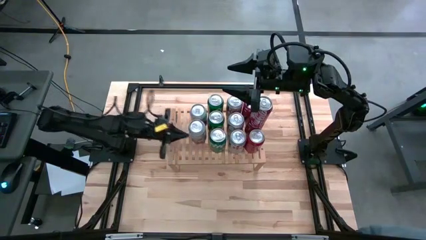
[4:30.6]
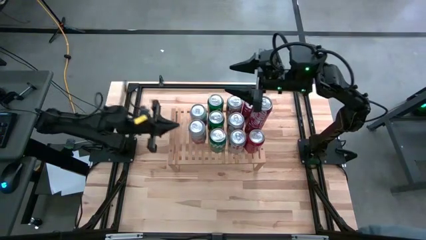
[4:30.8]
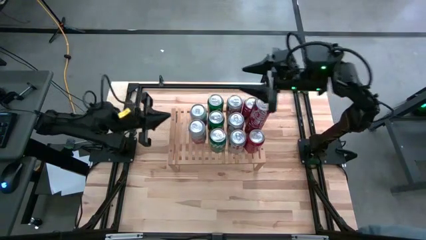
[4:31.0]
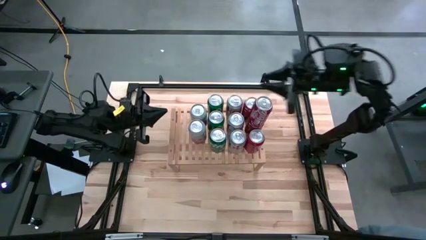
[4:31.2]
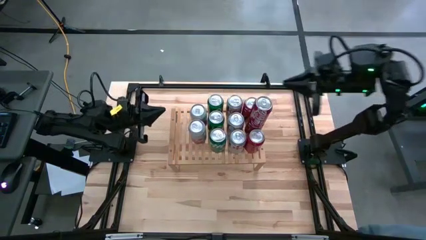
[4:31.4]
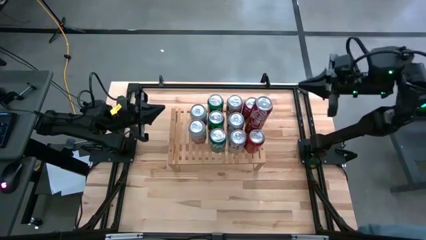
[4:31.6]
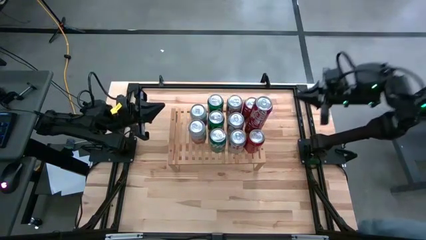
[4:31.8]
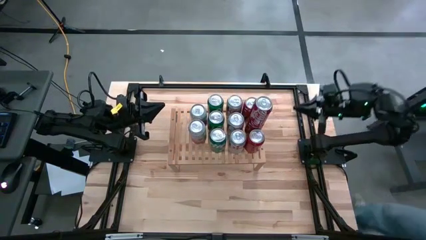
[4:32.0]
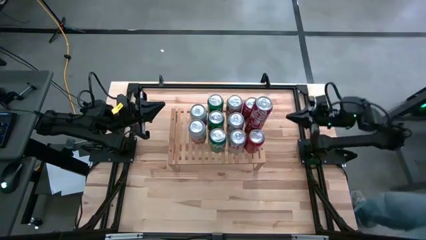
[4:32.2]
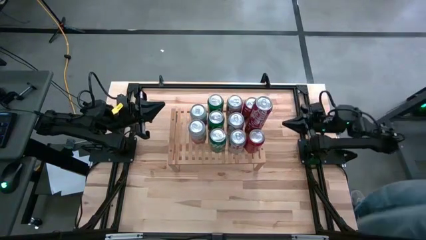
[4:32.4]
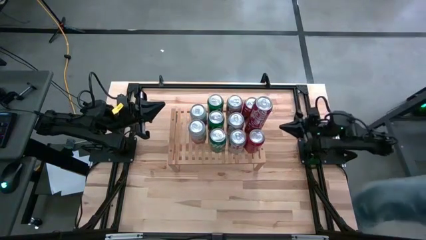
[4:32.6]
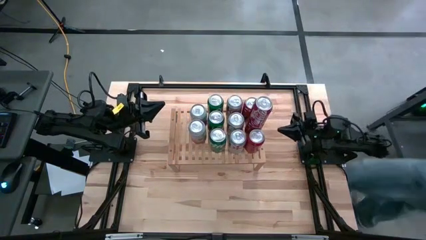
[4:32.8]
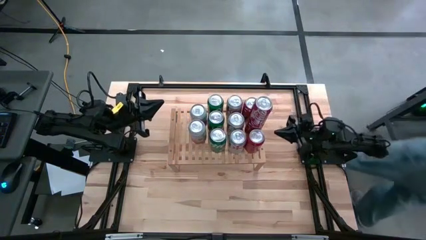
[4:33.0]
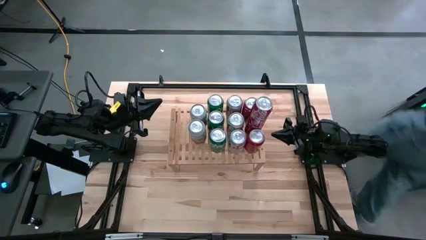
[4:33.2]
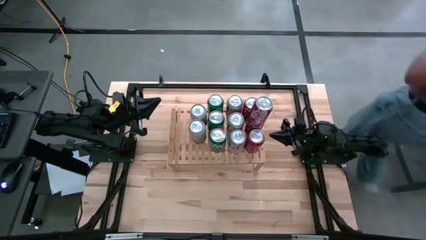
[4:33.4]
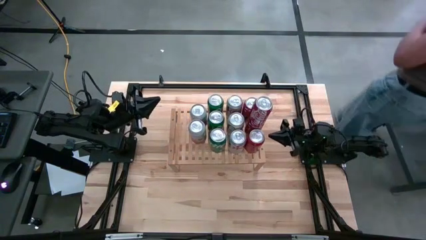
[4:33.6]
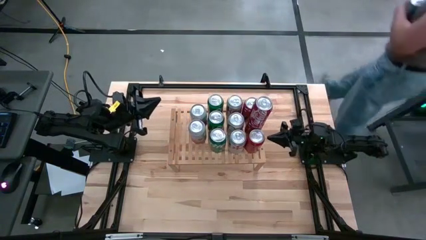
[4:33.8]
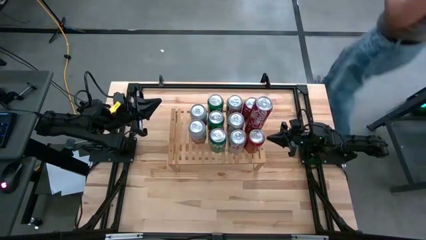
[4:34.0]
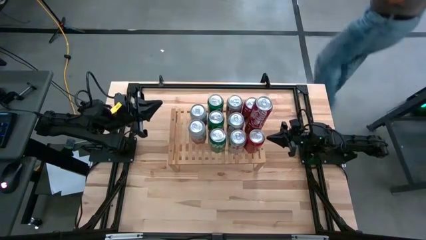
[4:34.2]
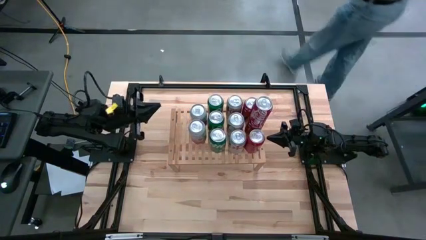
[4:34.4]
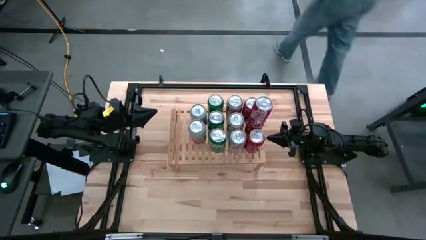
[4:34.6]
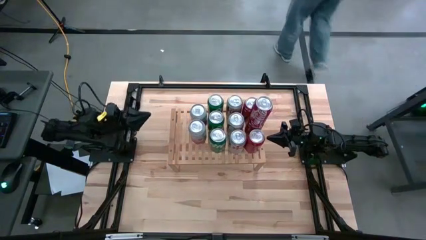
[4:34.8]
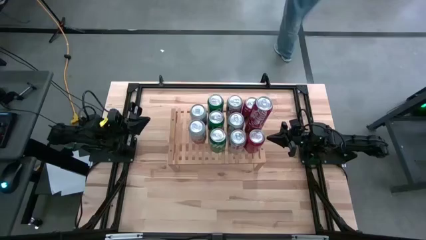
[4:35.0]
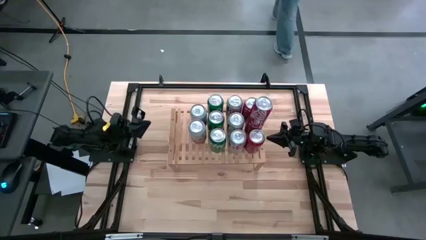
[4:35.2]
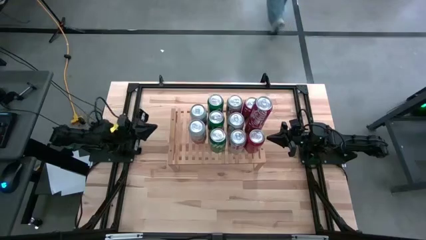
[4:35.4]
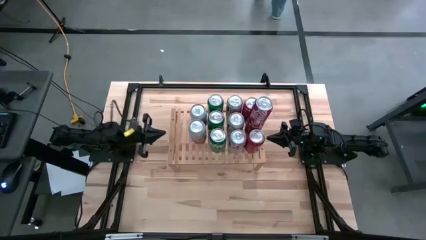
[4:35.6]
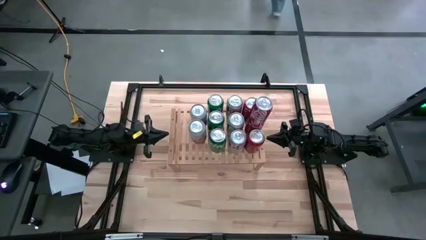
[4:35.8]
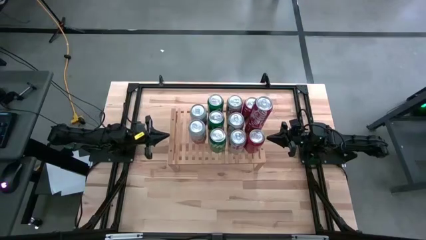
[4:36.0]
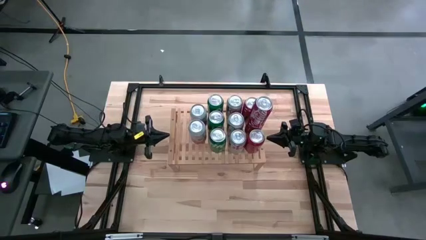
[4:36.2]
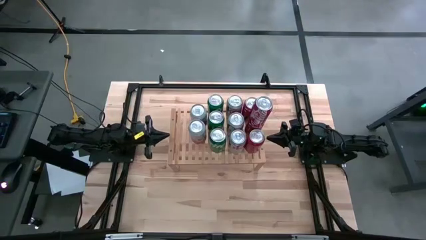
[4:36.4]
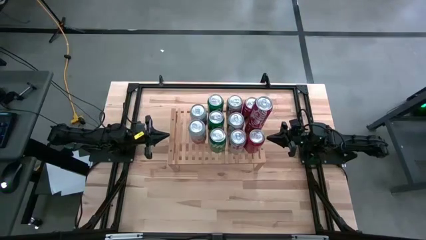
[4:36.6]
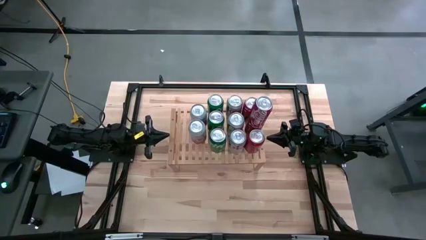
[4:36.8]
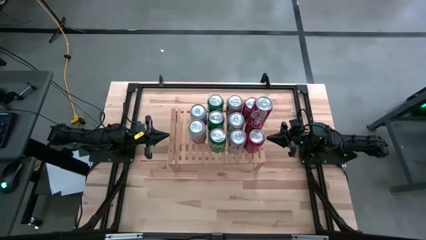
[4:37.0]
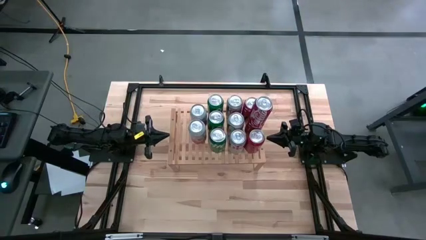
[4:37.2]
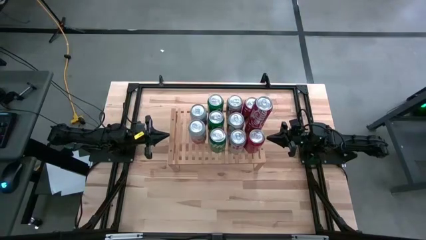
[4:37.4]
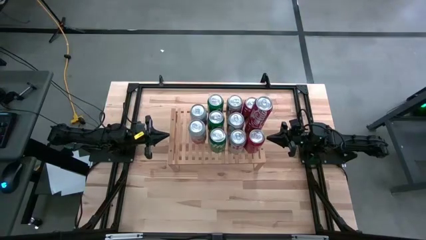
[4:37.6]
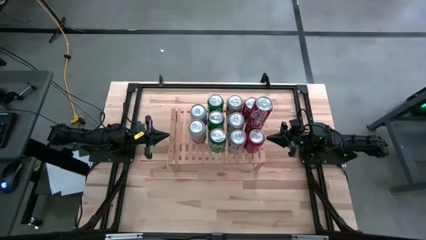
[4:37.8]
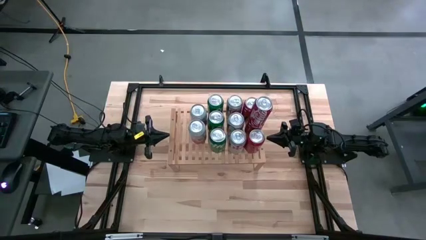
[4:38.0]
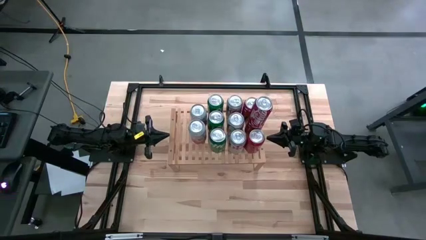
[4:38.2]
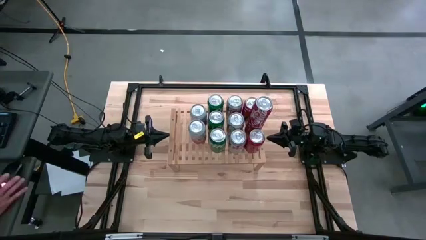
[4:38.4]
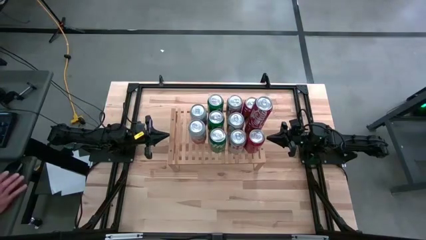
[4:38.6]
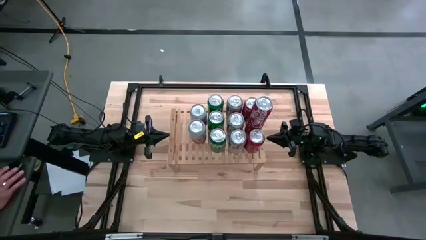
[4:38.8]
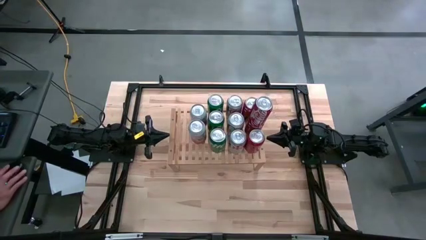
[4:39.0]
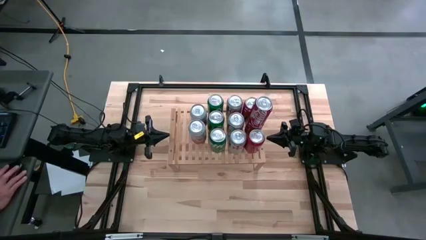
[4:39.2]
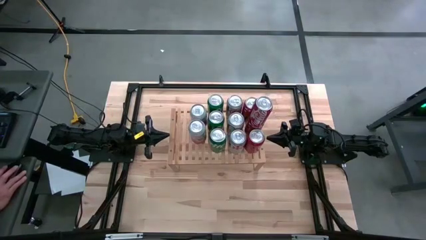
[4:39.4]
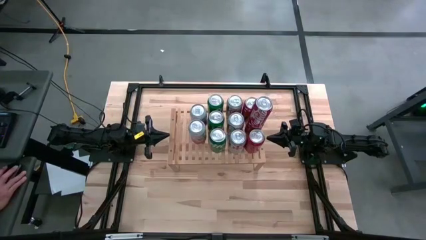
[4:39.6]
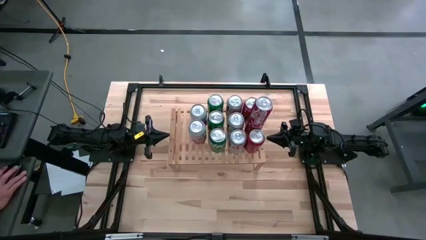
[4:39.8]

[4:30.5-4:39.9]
Task: Place canned beverage on shelf
Return to Home Position

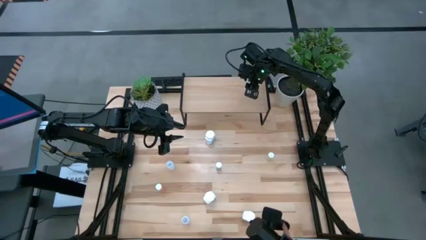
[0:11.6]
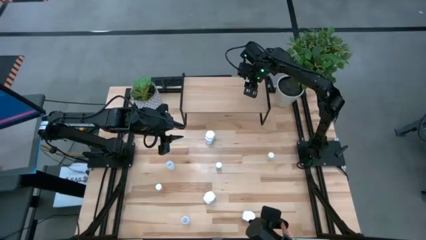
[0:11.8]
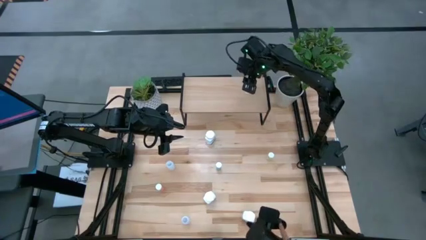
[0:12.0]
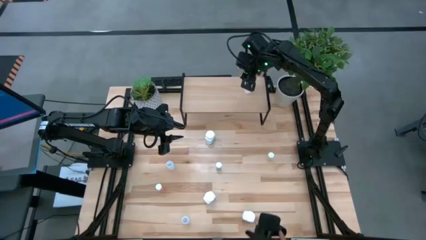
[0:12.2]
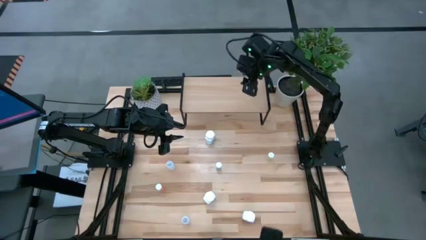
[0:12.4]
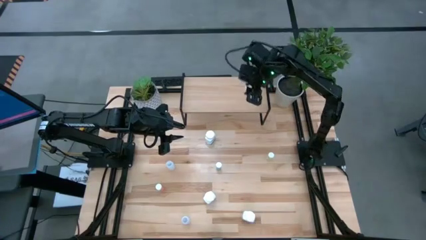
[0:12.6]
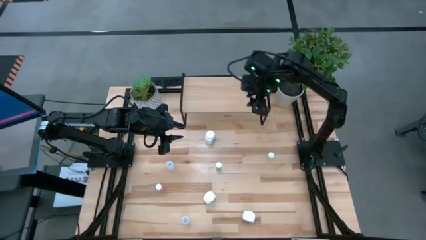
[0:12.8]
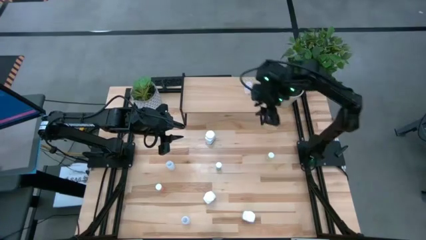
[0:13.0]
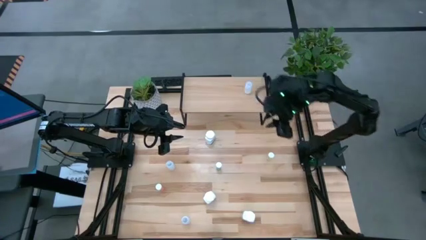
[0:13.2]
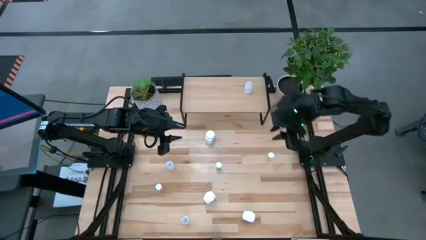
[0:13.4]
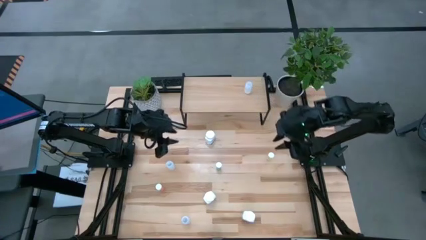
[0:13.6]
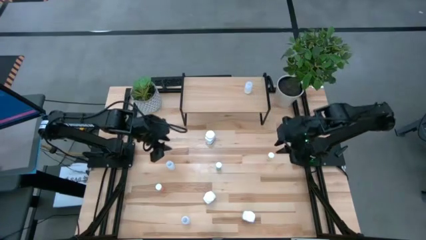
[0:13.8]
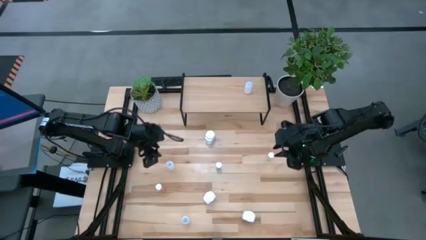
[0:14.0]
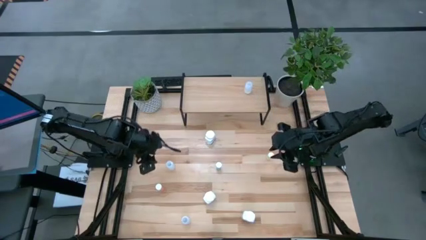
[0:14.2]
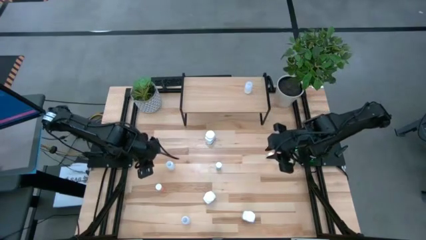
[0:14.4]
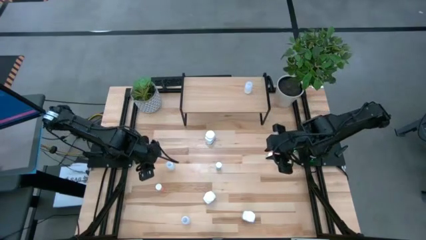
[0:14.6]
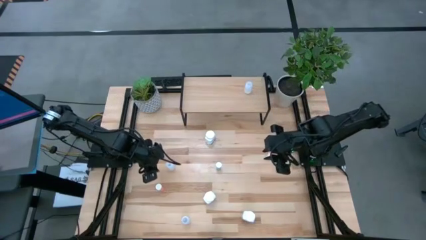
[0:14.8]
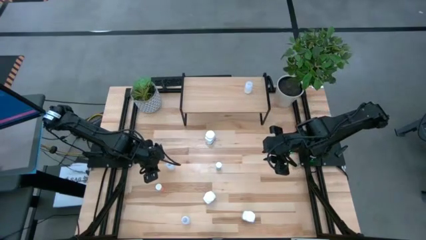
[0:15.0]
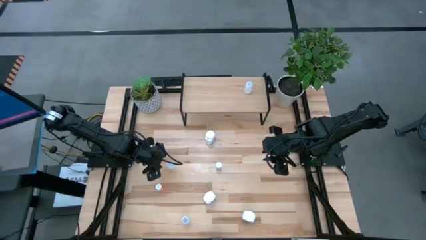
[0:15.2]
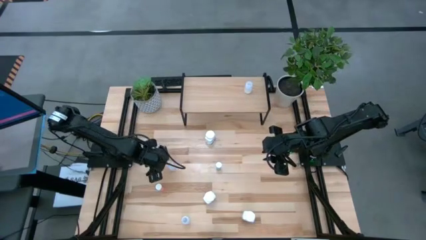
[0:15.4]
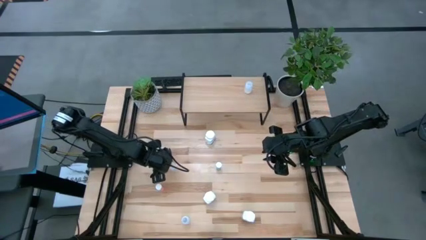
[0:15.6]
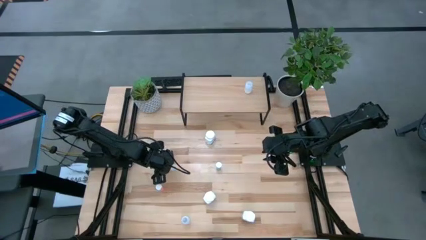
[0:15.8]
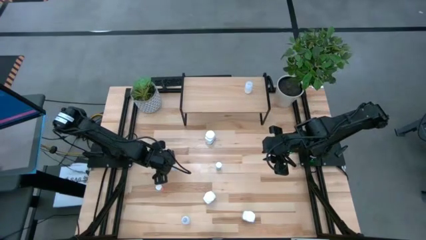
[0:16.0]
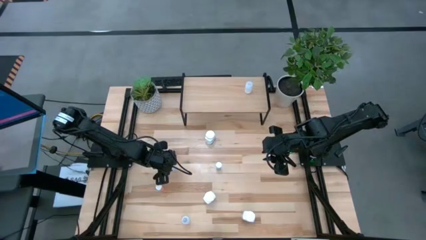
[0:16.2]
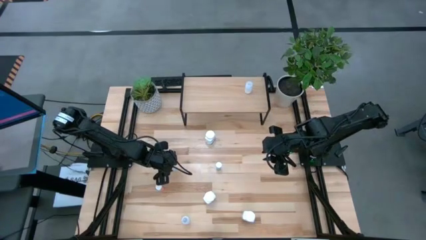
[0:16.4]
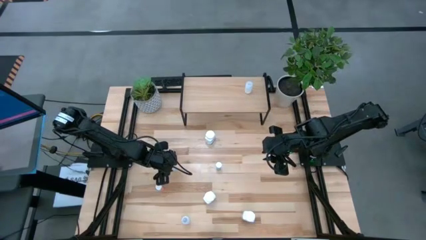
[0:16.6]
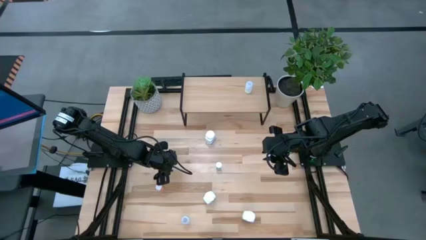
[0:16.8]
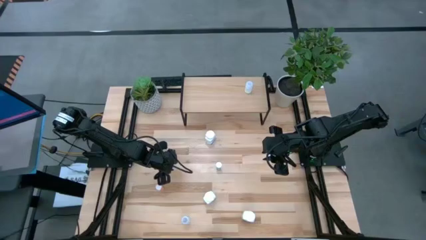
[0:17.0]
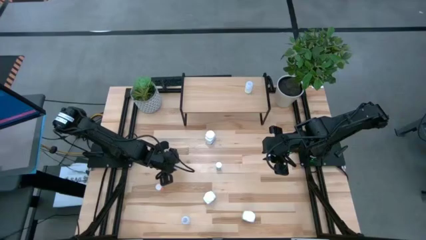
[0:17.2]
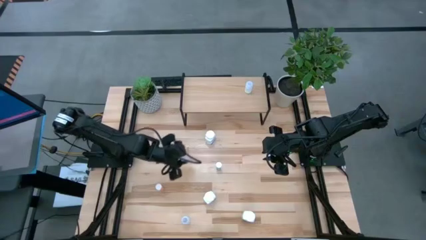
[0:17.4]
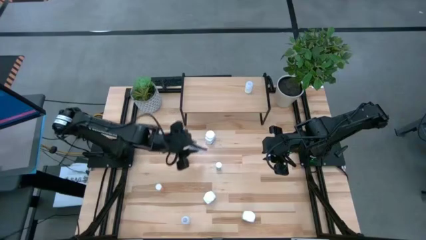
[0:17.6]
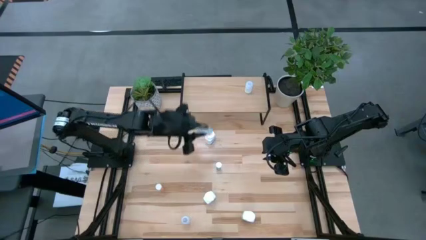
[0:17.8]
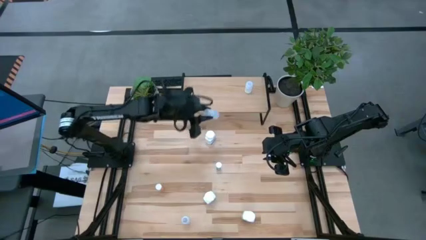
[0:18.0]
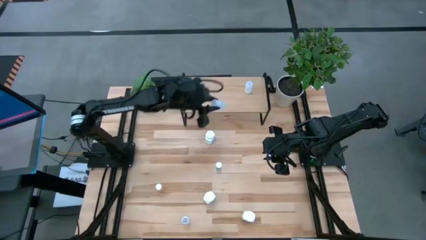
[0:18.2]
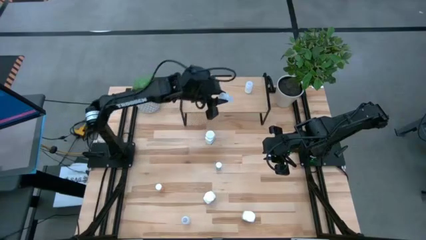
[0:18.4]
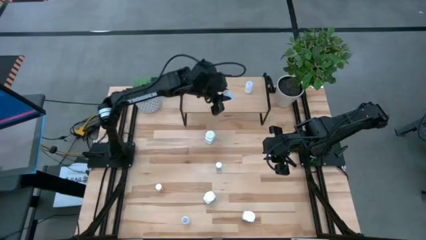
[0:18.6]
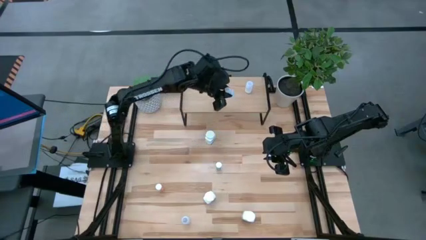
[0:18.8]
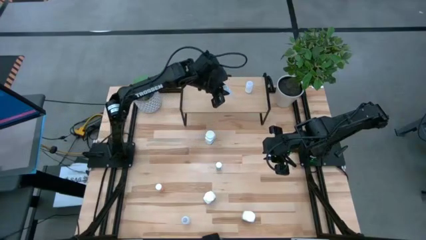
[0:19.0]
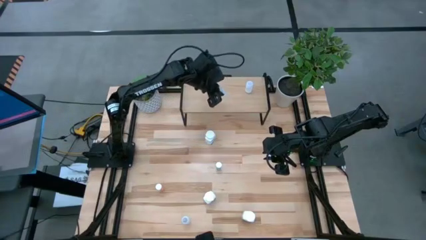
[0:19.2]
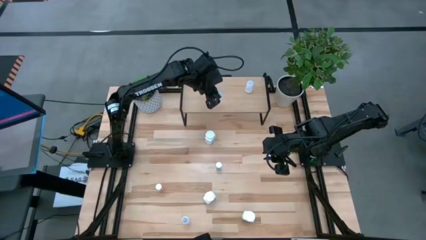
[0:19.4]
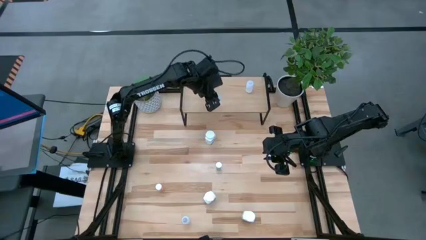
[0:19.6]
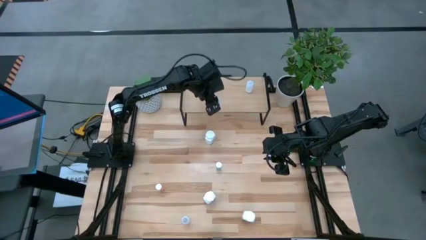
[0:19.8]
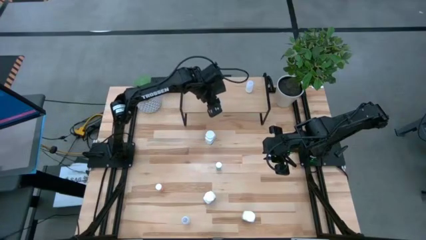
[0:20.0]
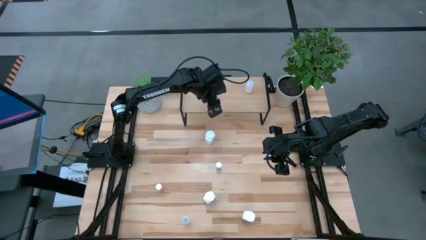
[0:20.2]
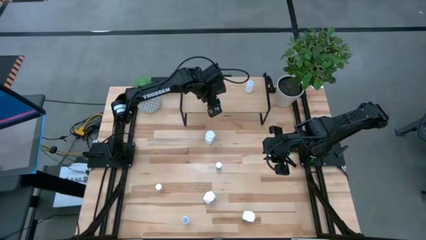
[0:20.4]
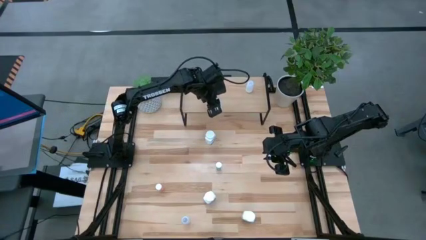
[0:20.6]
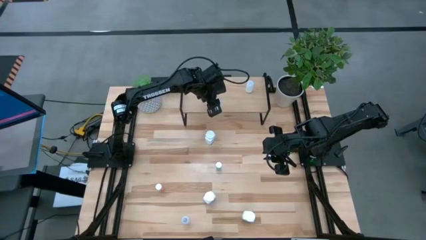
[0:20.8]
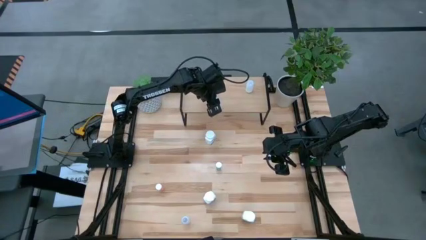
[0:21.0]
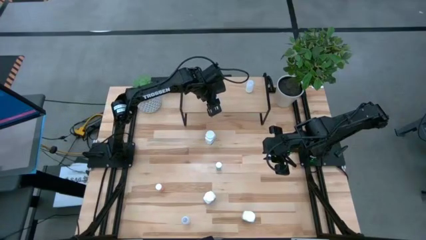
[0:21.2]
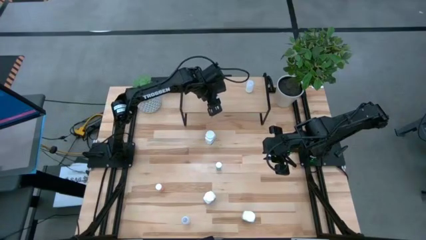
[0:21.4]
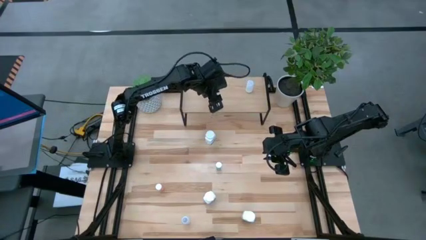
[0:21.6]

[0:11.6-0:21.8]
Task: Pick and place medicine bottles onto shelf by color
Put the top white pill bottle on the shelf
